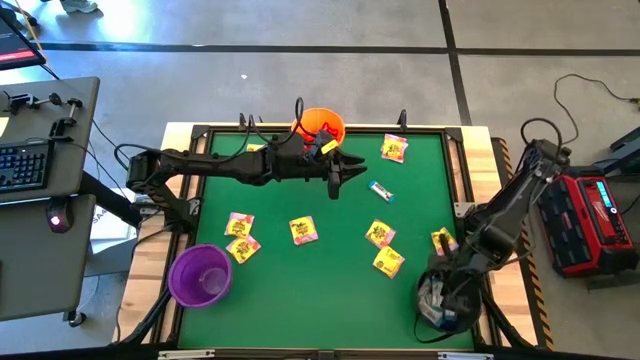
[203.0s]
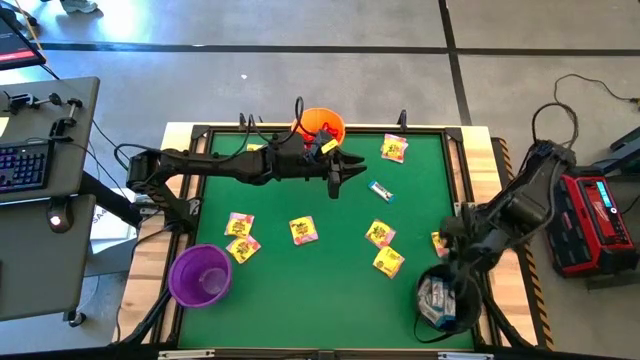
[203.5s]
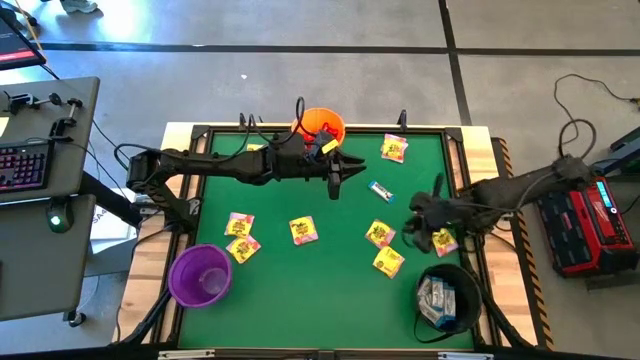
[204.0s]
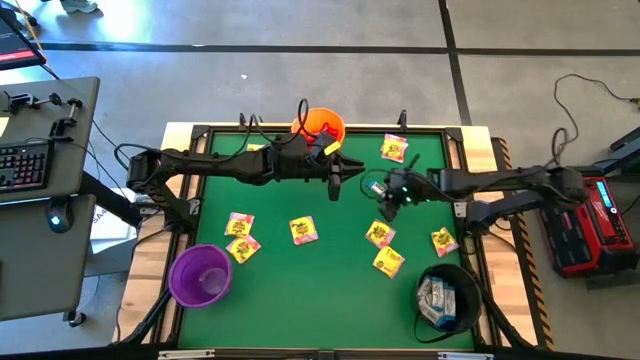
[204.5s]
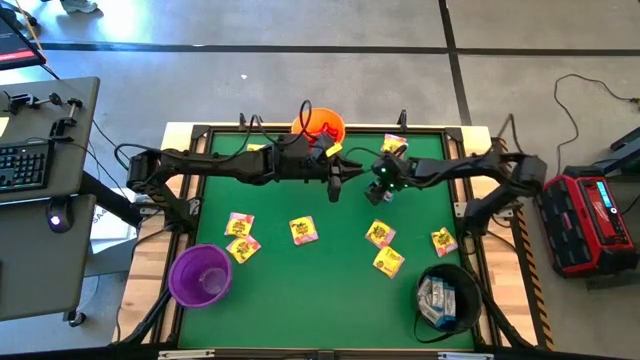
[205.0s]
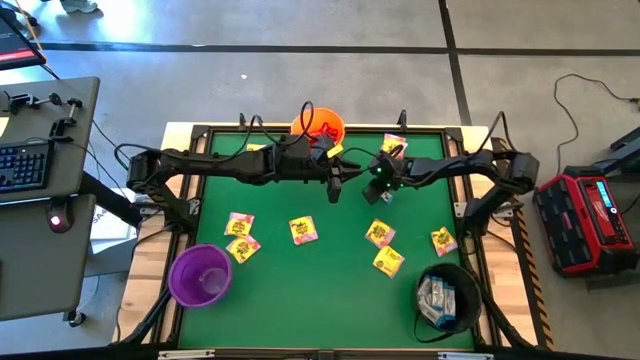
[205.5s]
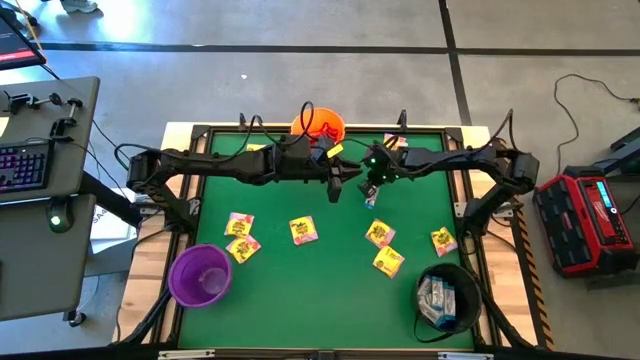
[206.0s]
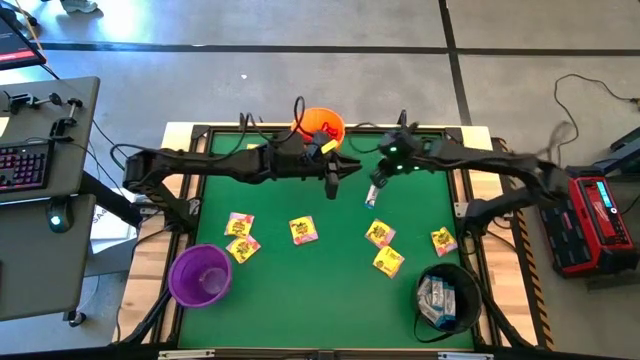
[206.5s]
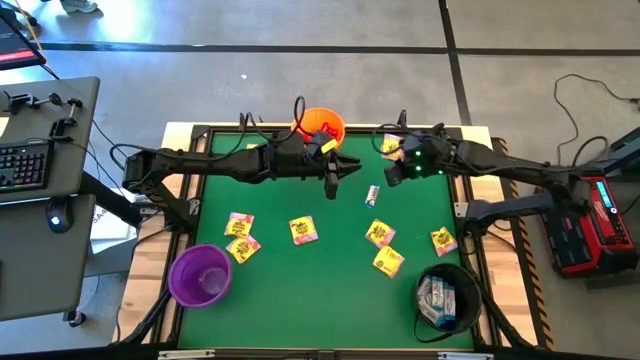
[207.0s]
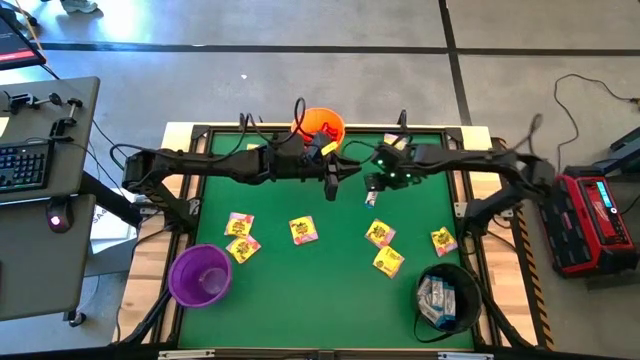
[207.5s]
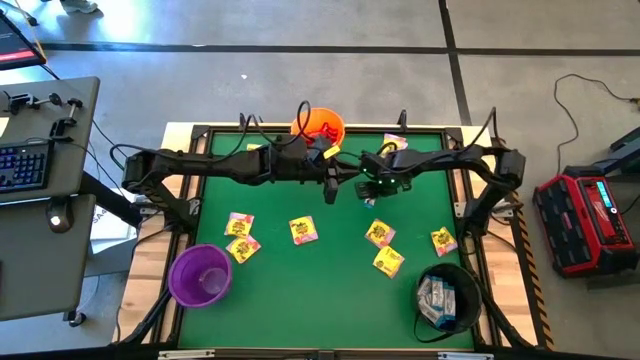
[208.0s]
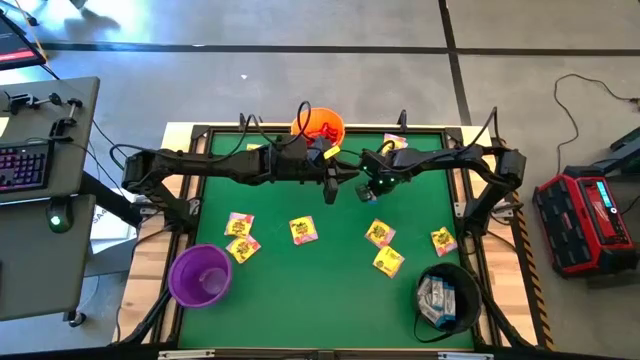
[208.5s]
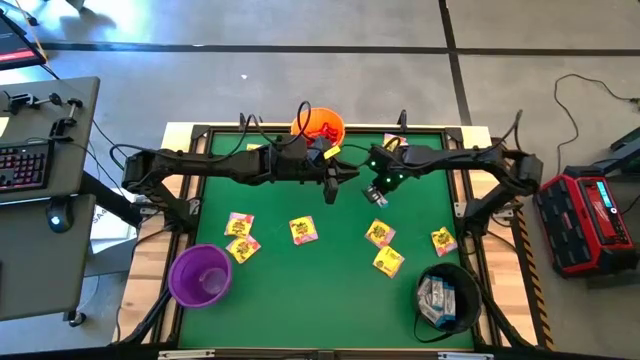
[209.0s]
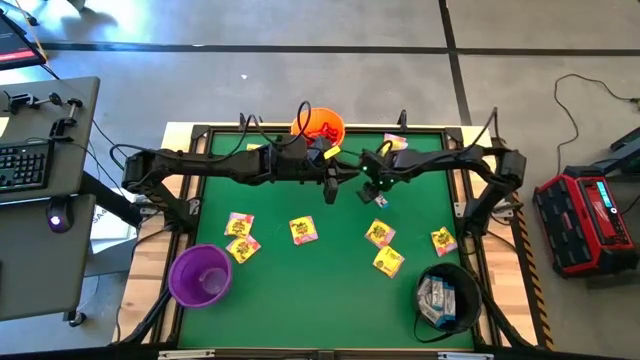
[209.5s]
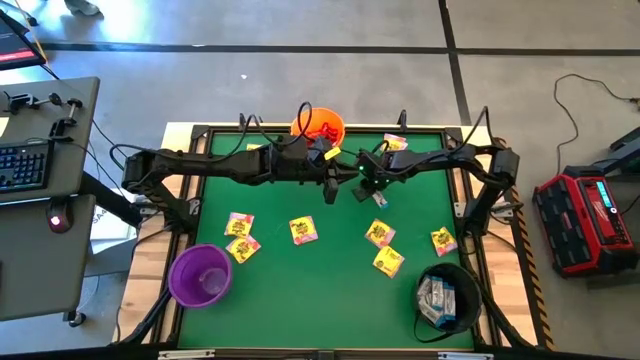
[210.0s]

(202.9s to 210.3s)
Task: Sort candy by brand, put in halloween buckets
Put the white chocolate bar into the black bucket

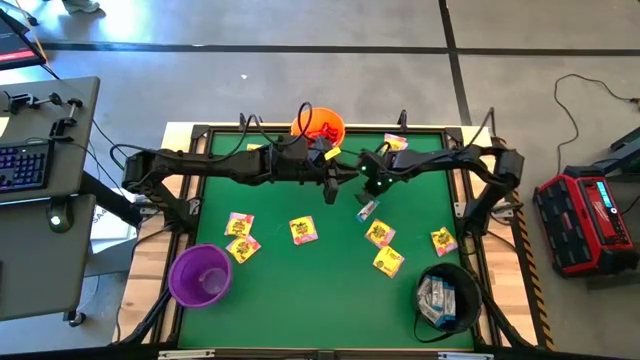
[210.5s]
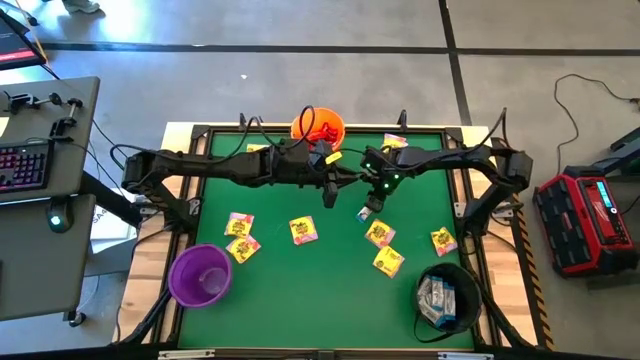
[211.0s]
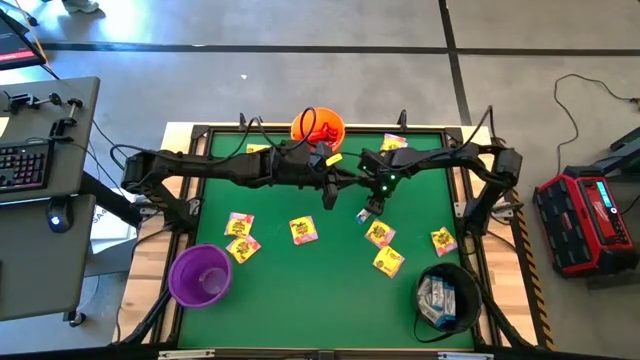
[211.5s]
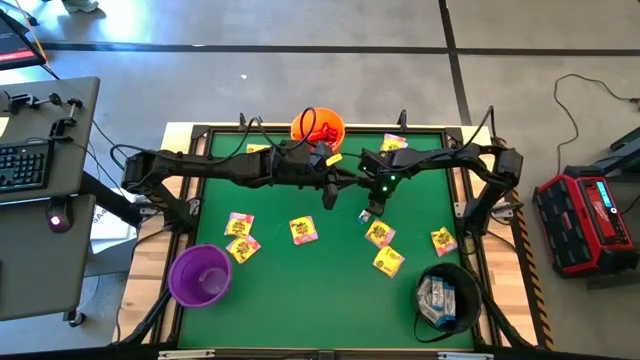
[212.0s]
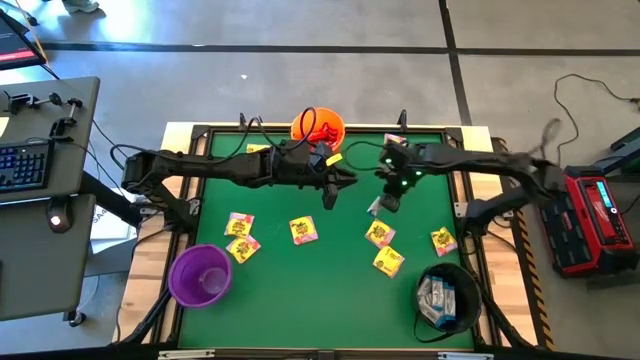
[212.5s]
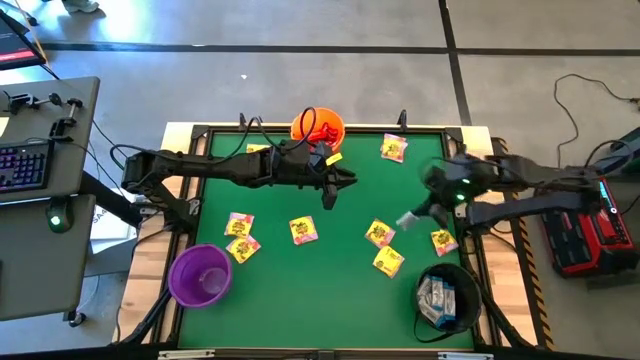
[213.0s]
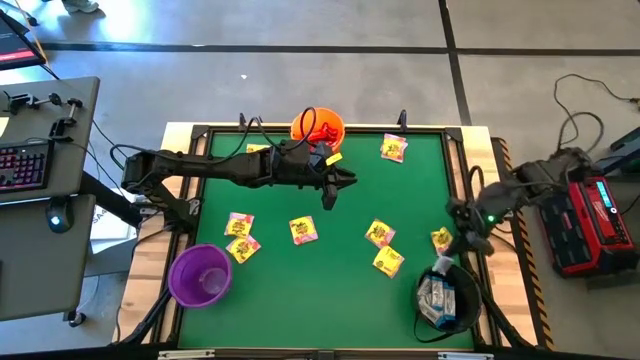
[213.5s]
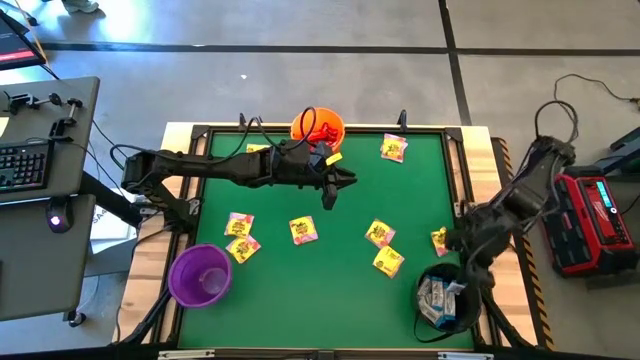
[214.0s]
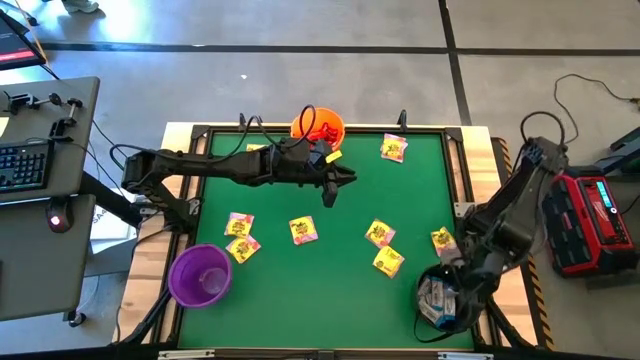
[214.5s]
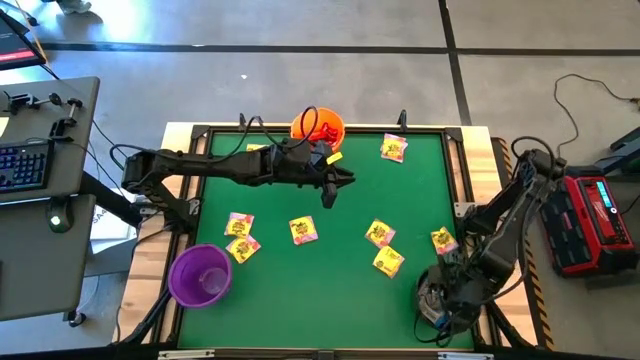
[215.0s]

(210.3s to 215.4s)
Put the white chocolate bar into the black bucket

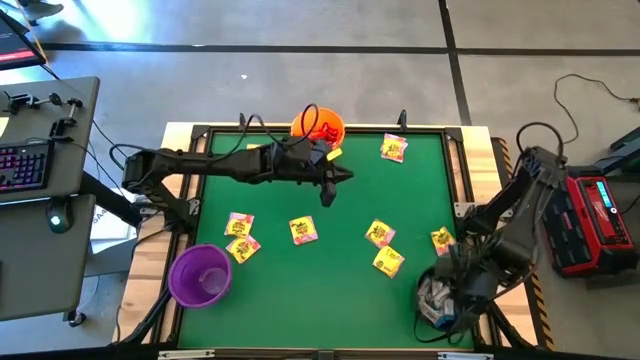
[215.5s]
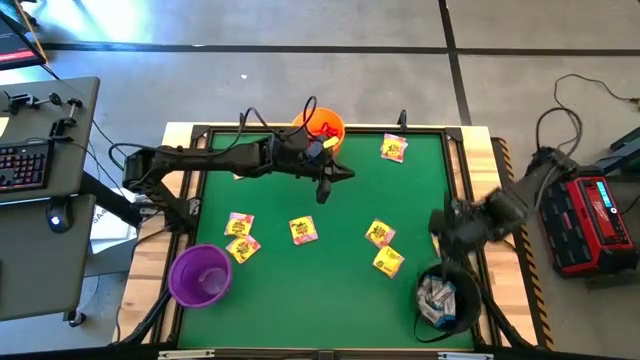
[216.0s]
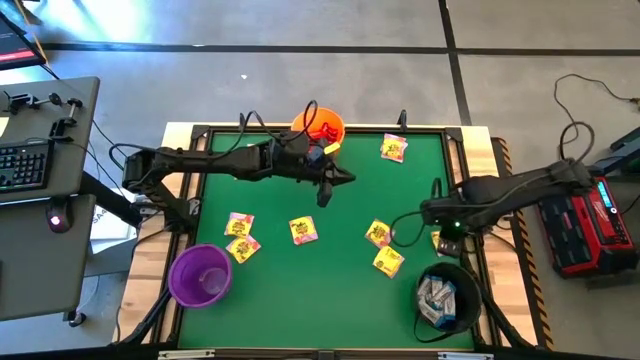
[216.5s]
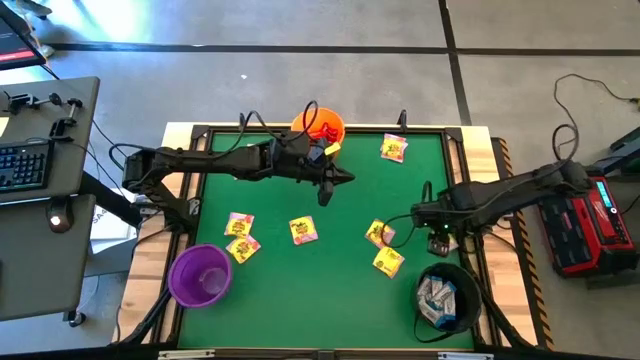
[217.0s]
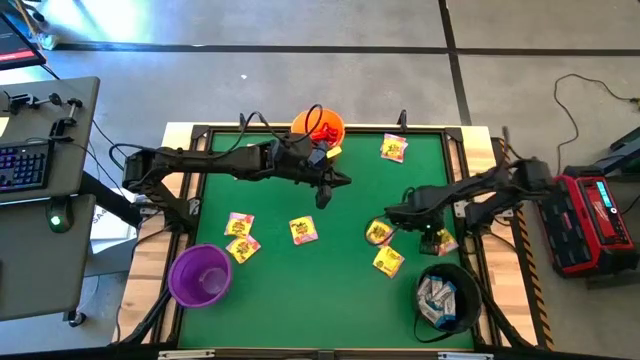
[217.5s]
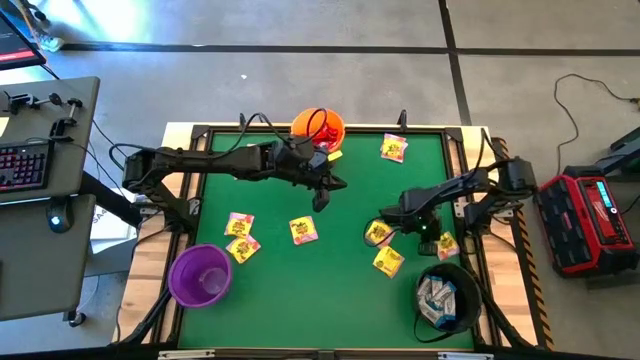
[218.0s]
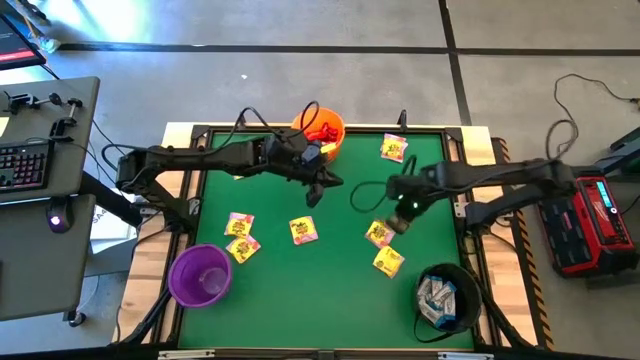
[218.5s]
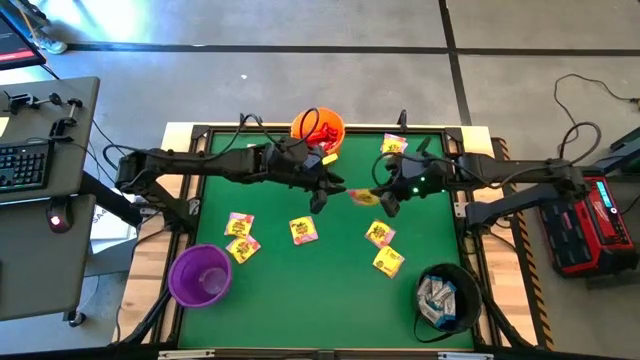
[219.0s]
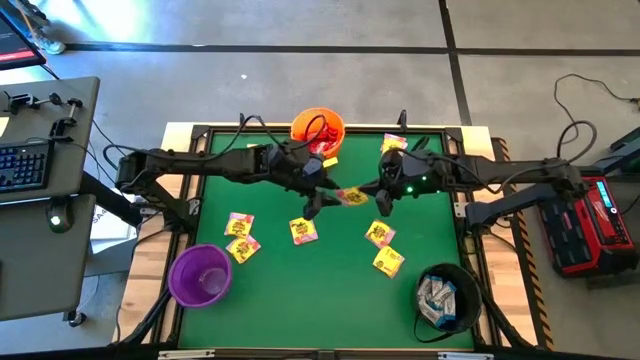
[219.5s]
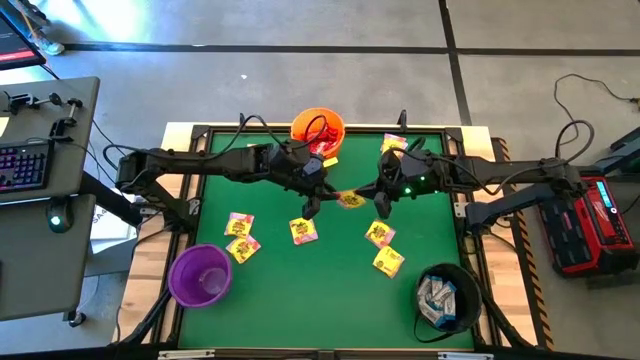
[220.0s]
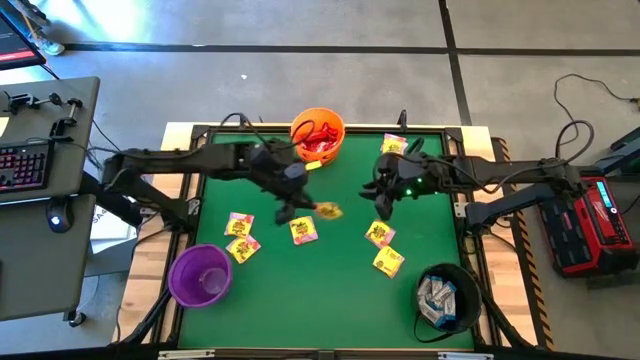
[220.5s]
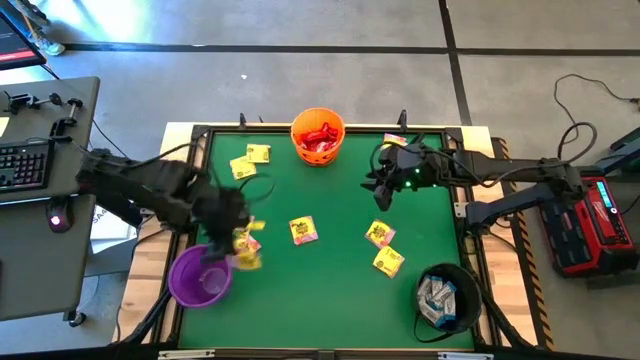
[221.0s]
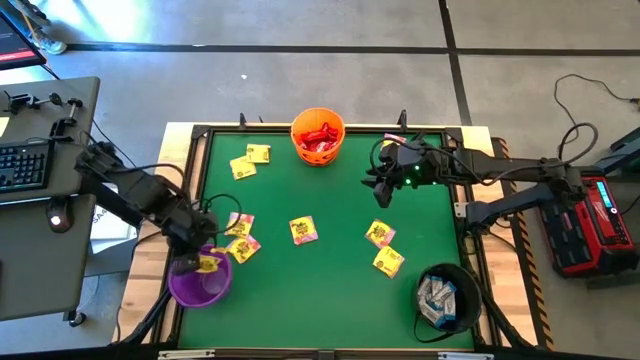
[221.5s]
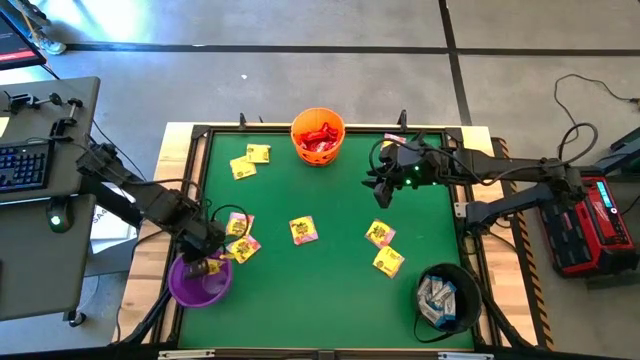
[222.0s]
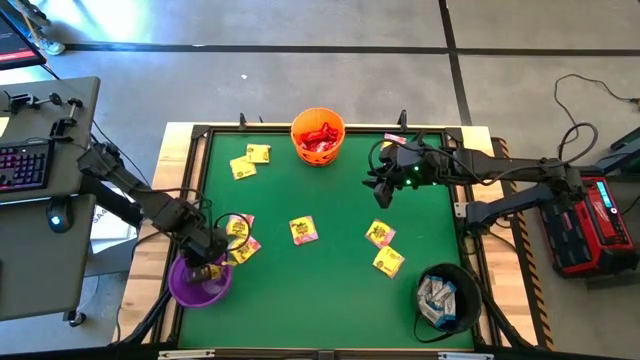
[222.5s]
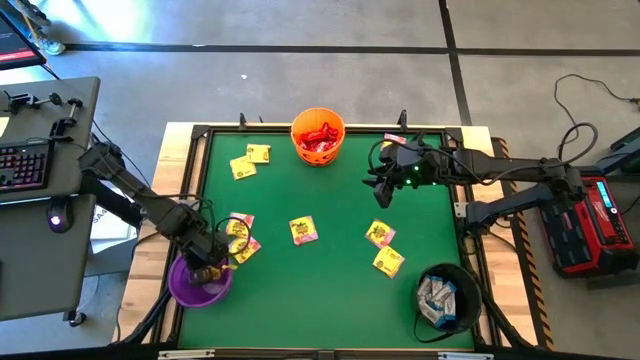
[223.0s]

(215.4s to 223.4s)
Put the yellow candy into the purple bucket

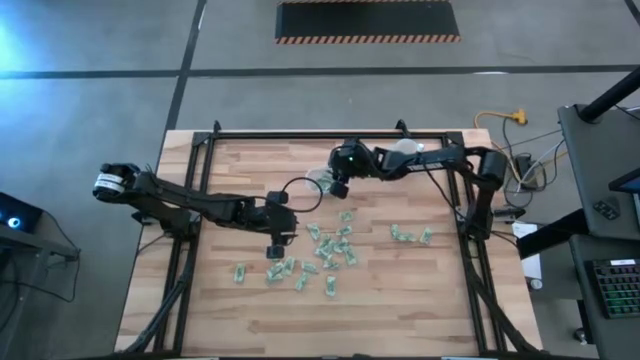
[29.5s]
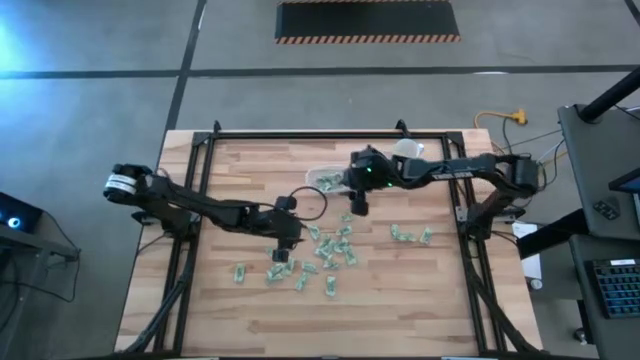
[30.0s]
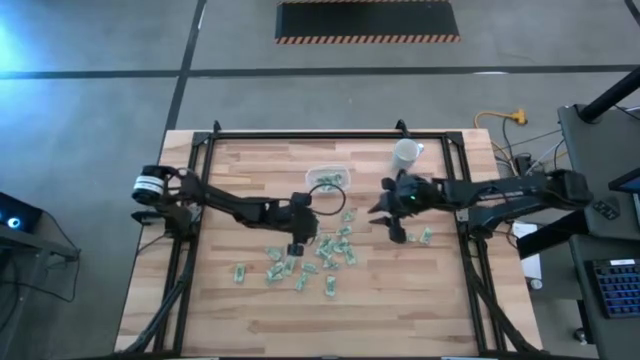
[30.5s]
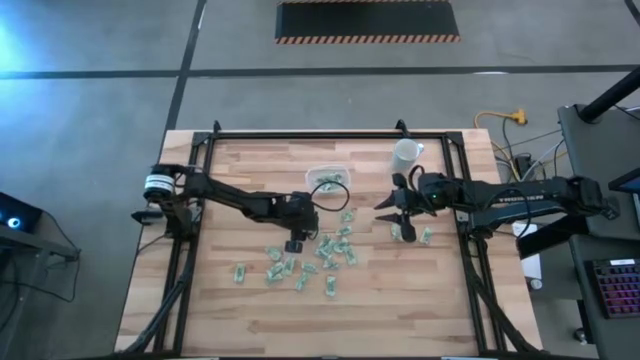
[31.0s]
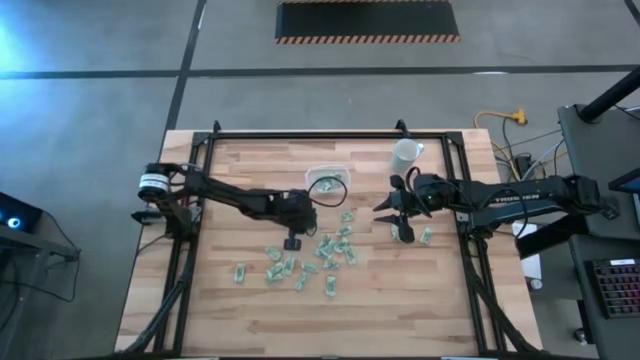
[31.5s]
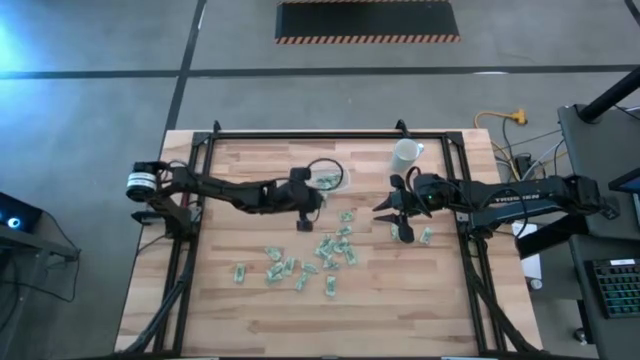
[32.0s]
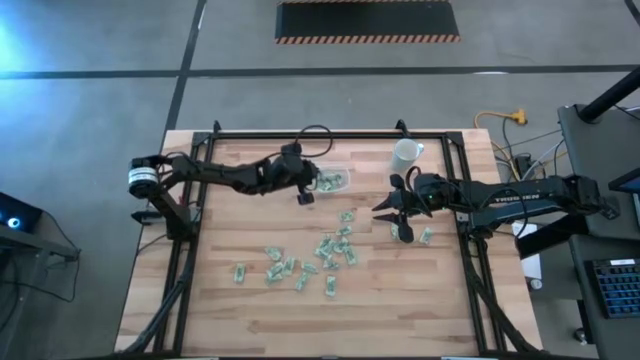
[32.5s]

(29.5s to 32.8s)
Task: Pick and place Stevia / Truvia into bins
Put the stevia packet into the transparent container
